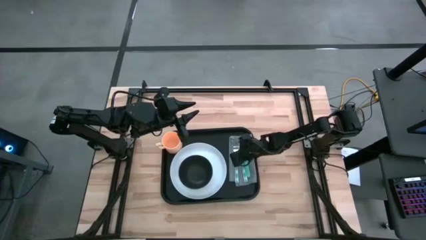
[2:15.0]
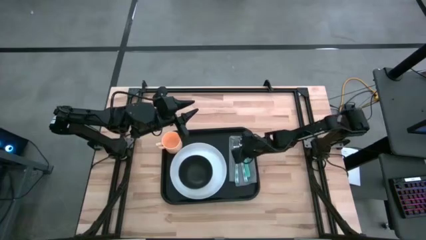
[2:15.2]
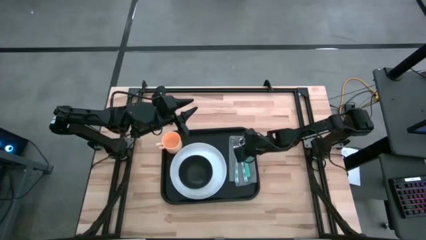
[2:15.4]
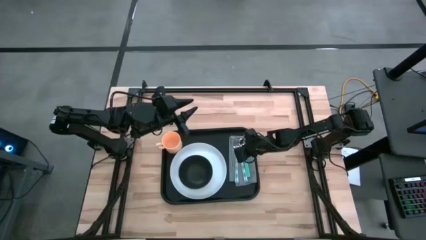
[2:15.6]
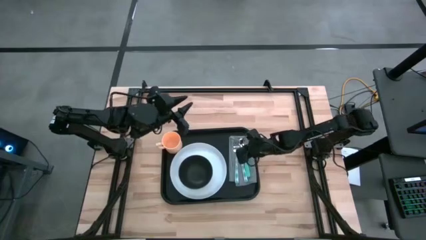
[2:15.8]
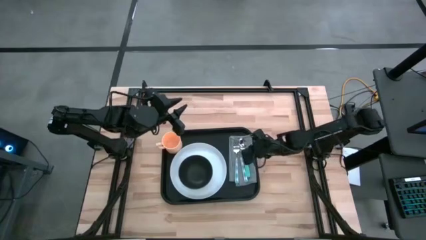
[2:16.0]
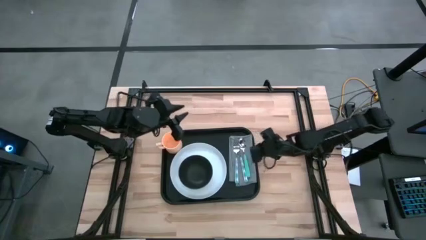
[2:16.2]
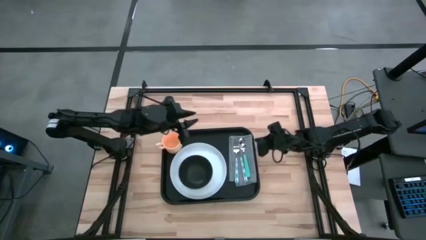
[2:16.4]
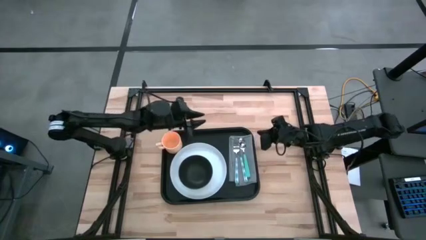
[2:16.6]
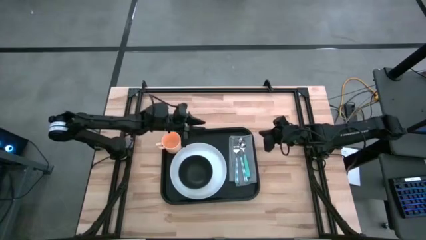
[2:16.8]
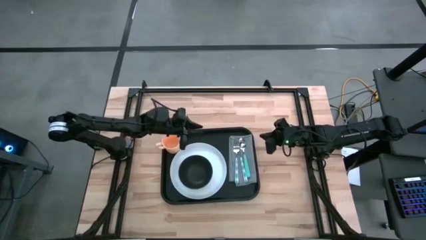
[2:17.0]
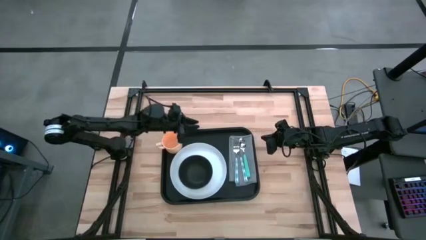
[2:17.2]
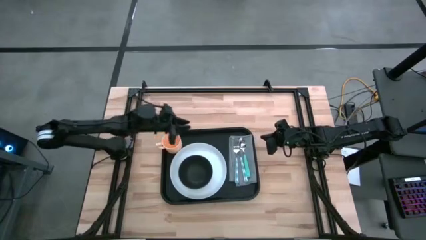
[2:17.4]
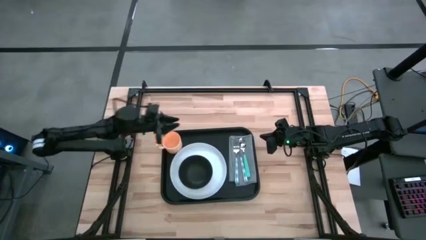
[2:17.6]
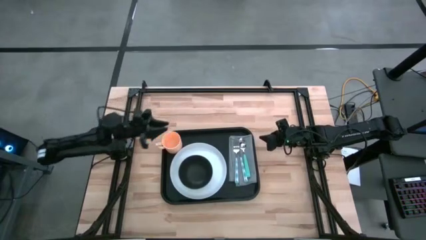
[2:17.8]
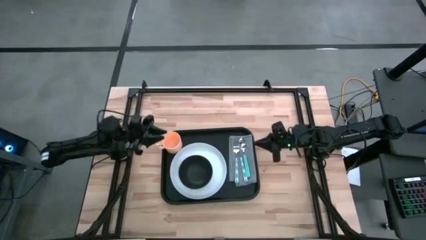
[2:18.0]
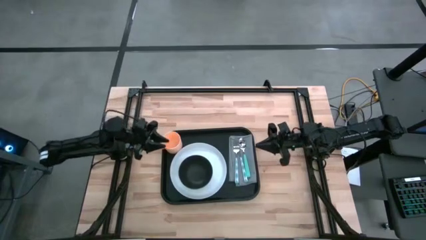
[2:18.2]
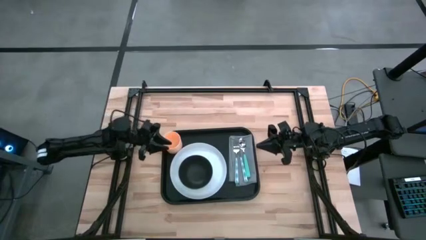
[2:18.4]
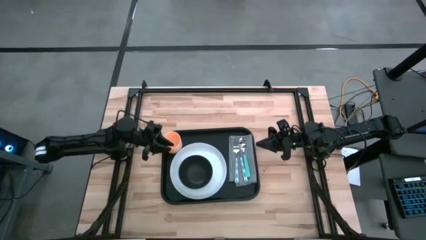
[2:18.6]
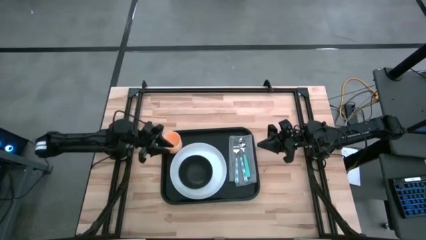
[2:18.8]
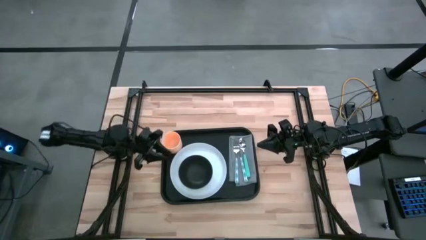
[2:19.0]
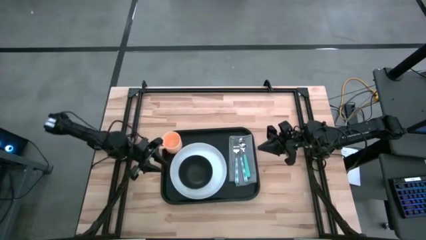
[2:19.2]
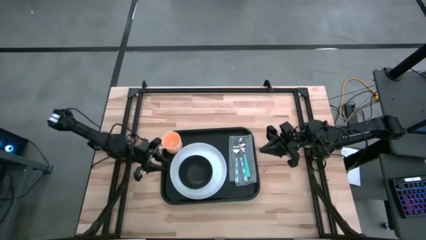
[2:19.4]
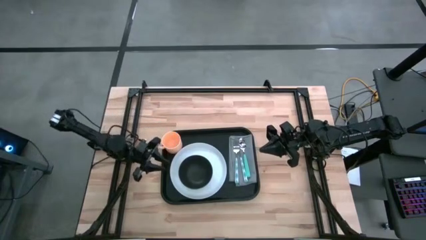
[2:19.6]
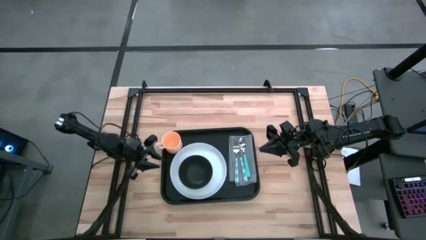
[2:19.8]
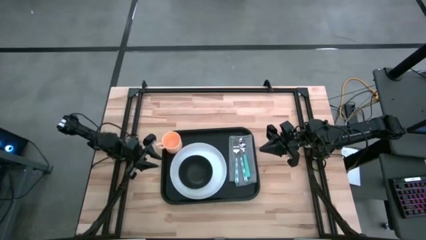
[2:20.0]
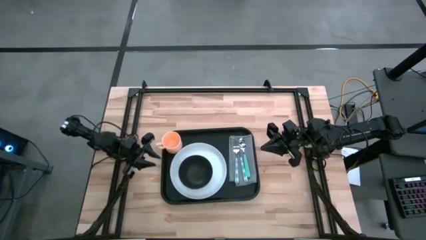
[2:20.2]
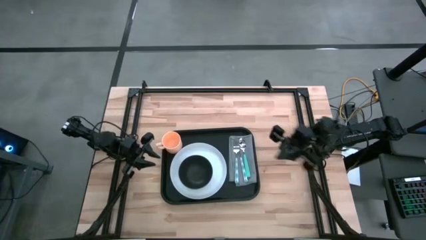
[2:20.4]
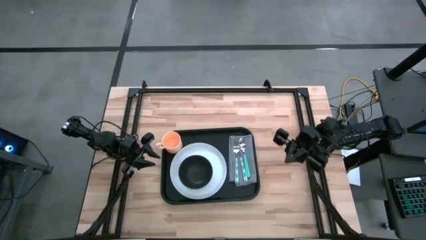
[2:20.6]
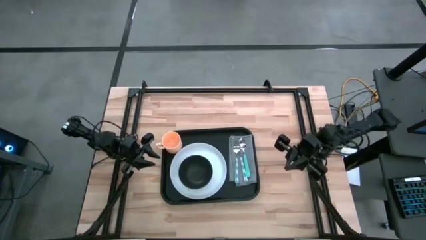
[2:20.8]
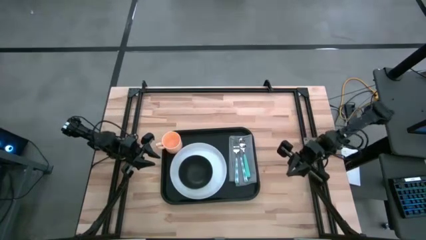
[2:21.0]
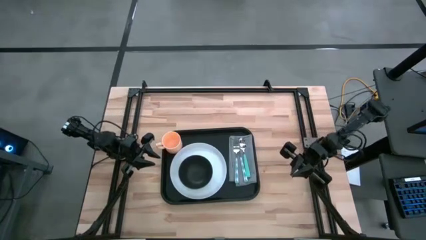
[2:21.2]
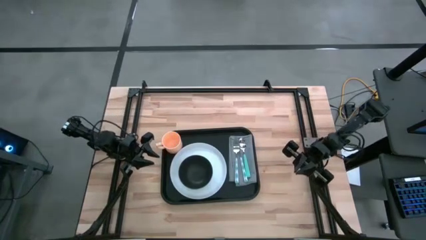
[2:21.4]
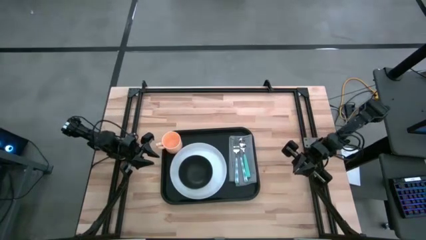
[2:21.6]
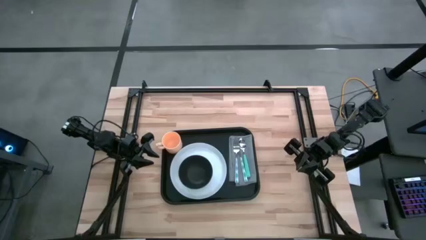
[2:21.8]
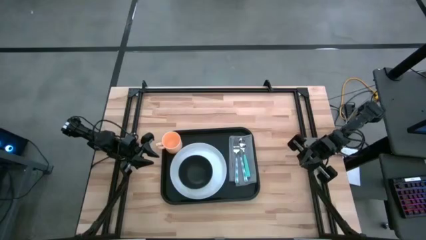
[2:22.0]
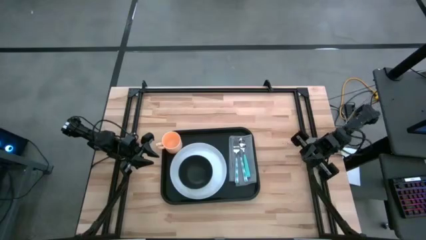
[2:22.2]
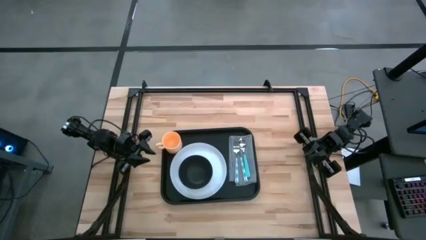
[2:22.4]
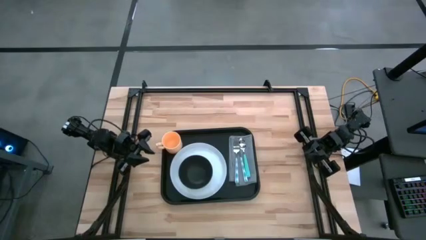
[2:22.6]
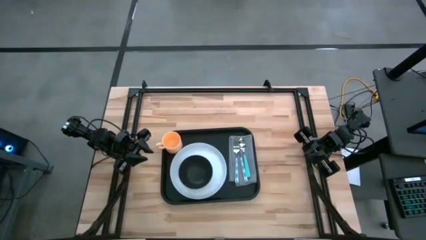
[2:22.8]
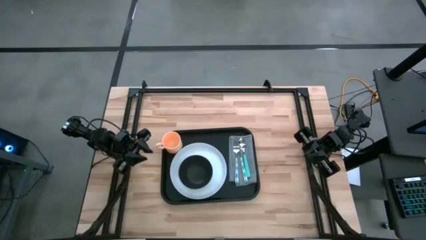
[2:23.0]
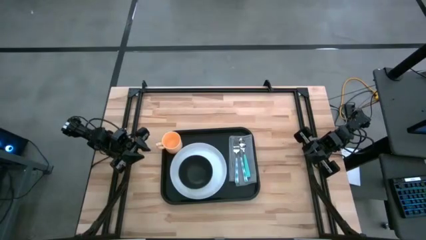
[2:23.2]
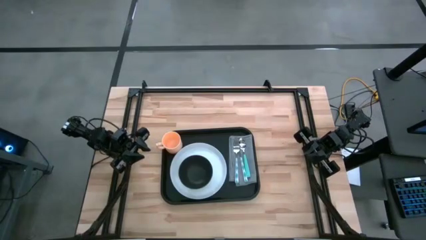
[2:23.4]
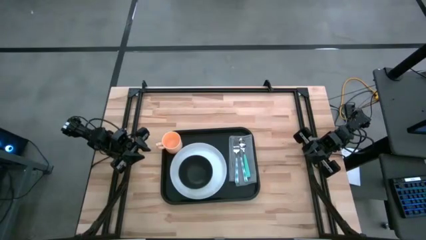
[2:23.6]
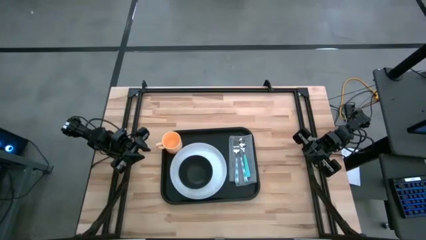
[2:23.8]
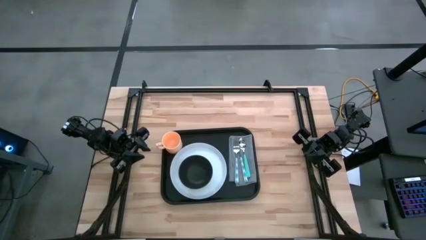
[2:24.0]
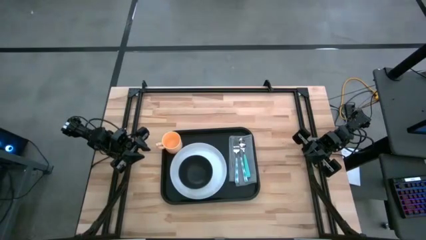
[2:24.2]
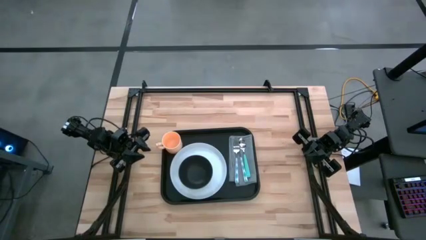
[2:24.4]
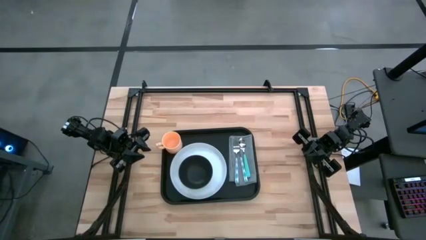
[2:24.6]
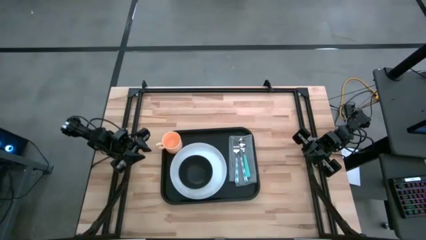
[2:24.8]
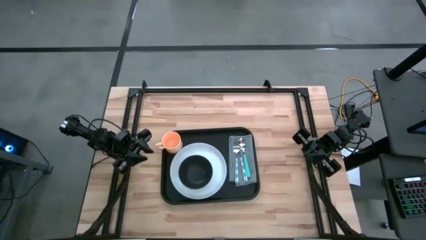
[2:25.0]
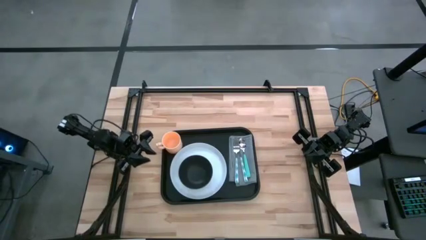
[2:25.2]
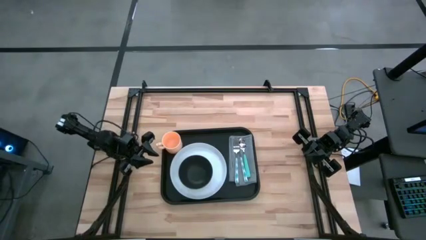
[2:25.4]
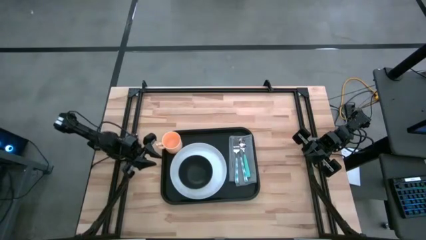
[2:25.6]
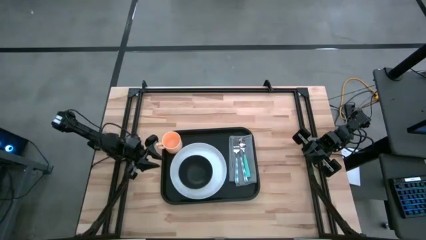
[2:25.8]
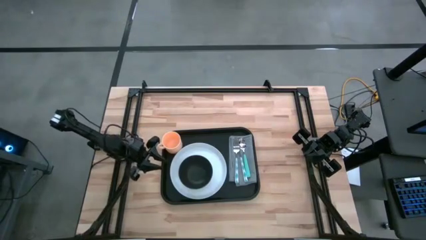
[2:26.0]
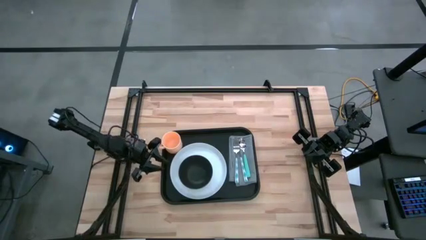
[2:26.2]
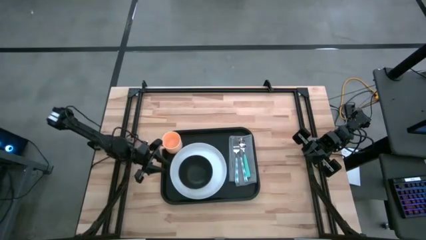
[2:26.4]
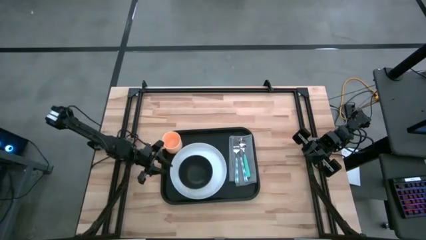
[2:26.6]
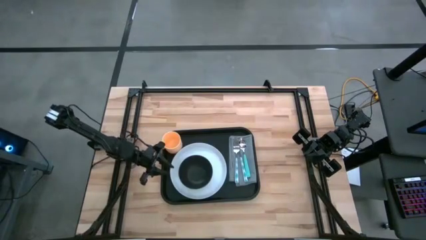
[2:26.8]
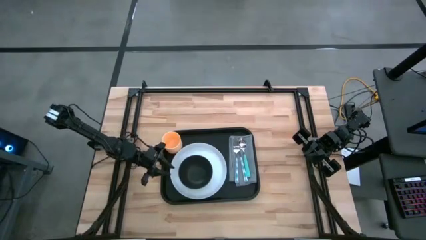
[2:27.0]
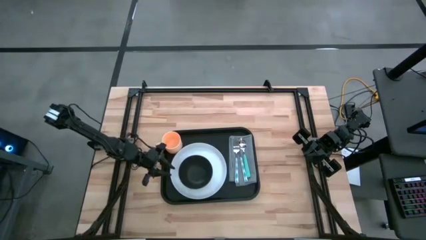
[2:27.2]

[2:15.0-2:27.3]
Task: Set up tray
Return to Home Position

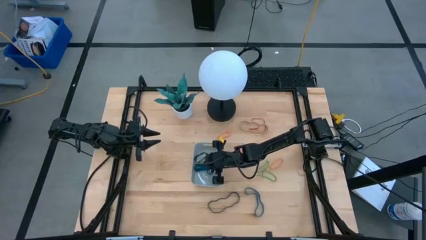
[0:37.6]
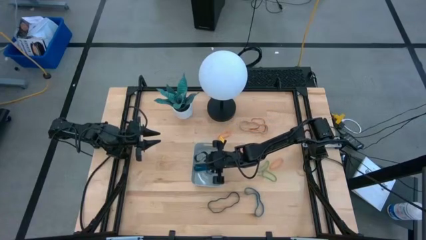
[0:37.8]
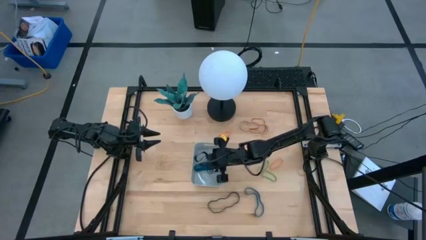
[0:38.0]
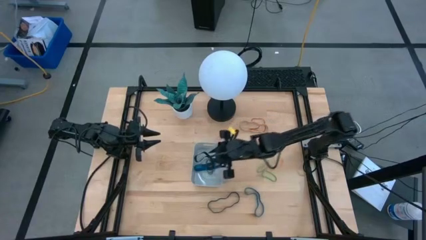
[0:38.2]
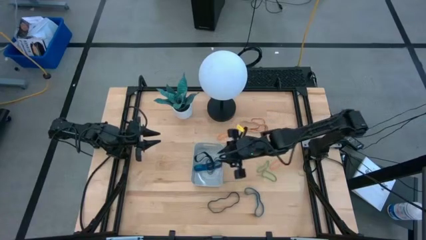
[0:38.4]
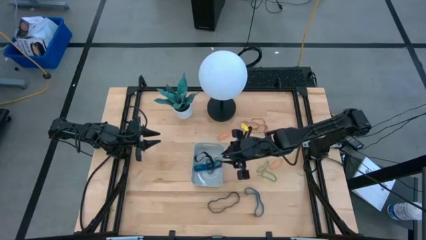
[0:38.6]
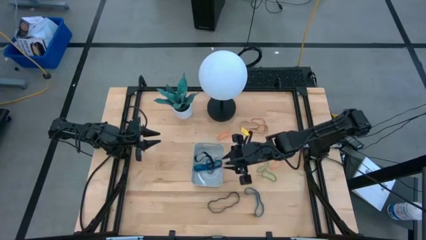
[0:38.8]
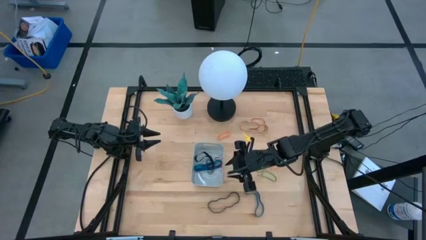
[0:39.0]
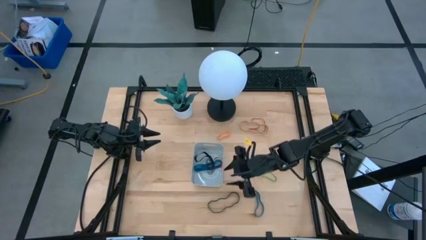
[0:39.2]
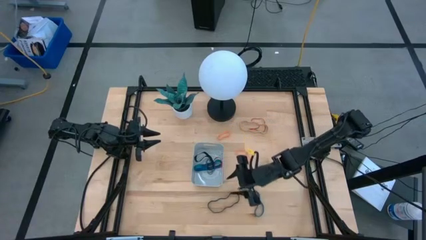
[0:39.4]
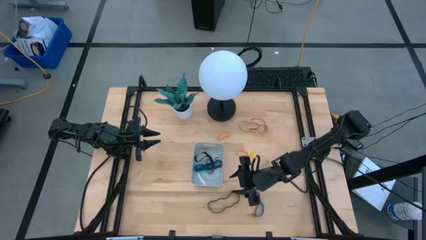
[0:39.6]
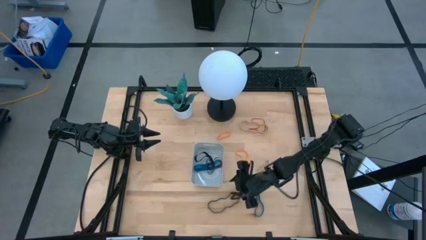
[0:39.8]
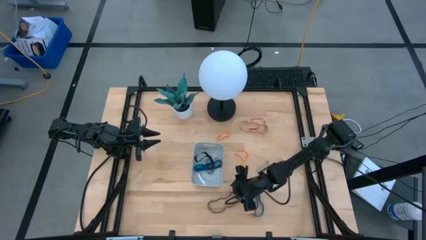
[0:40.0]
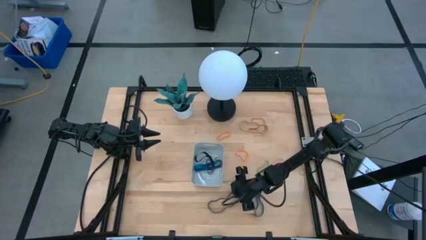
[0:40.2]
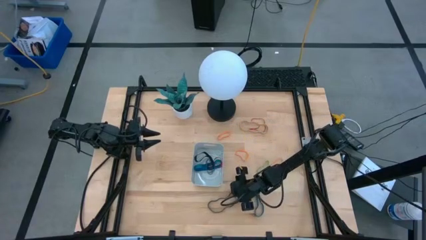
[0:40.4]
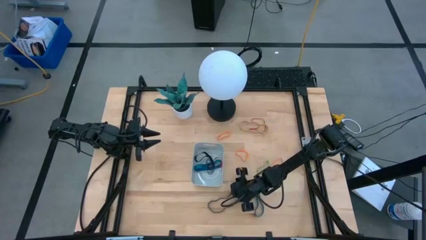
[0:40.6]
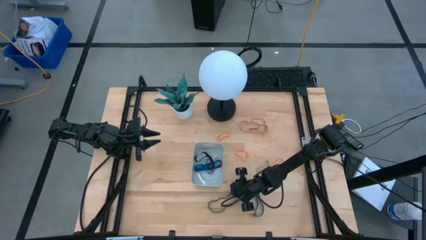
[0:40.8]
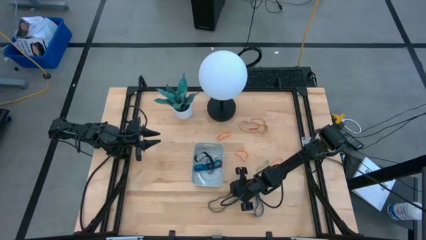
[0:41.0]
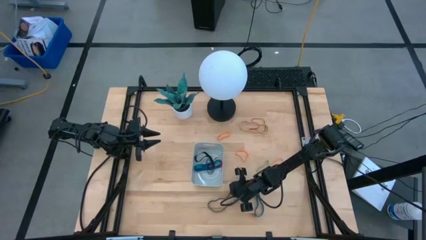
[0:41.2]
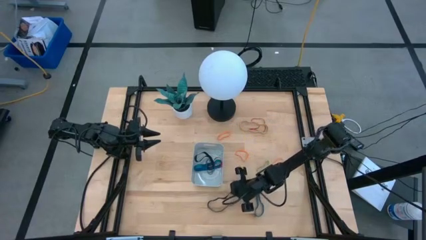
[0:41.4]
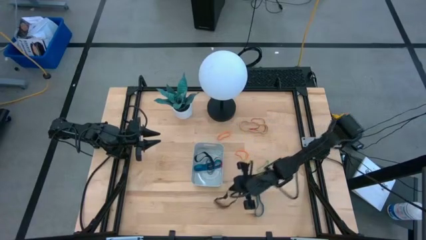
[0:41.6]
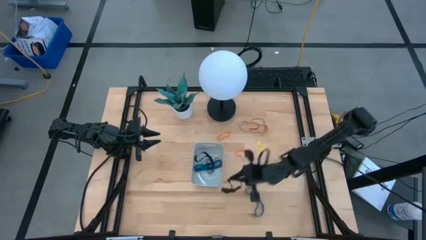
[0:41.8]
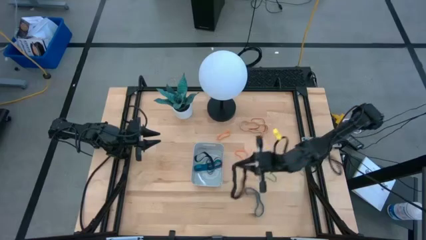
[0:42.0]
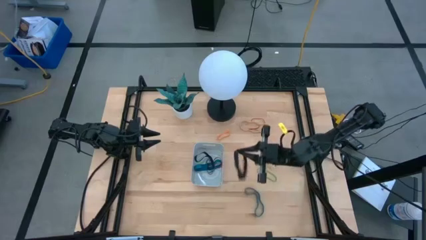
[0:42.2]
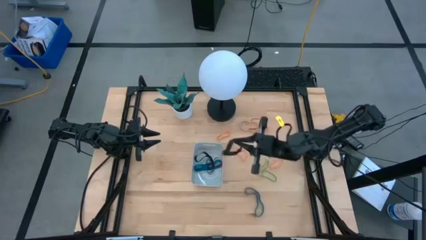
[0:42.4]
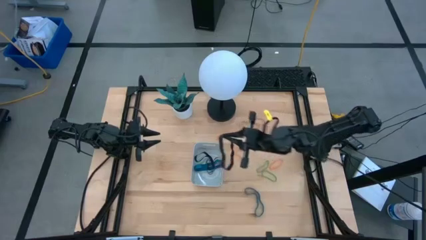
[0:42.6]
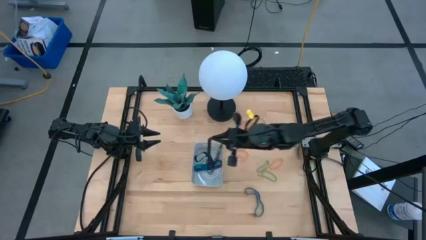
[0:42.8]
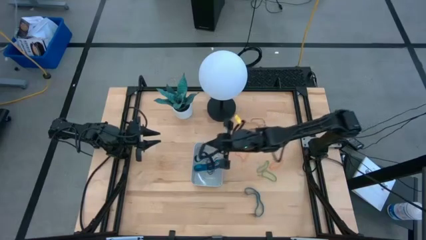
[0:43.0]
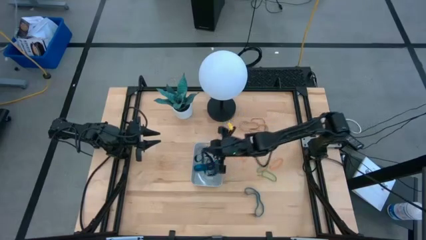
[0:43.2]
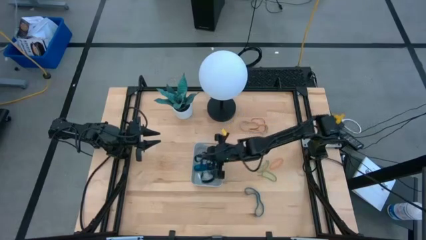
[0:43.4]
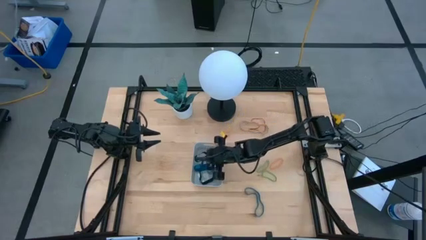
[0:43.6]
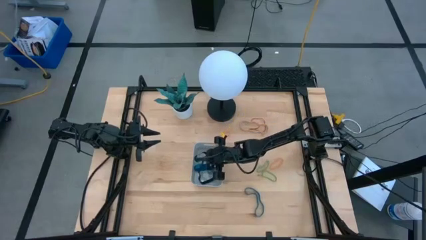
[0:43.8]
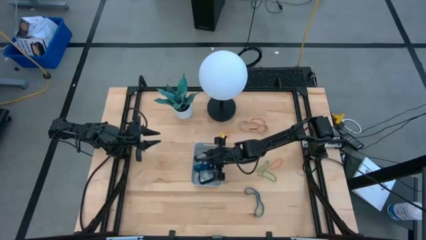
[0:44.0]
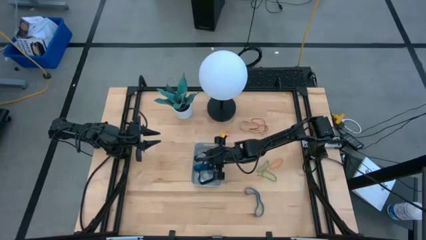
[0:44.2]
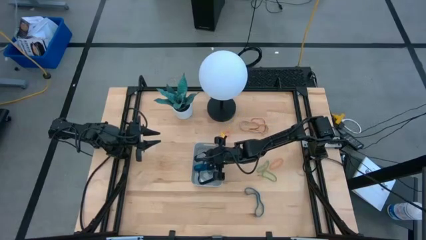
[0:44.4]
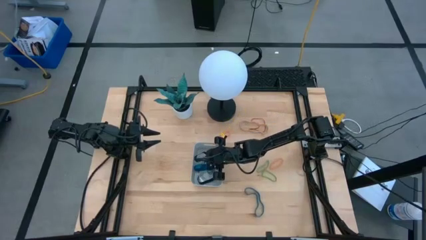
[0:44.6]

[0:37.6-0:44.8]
Task: Pick and place rubber bands into bin
Put the black rubber band into the gray bin
